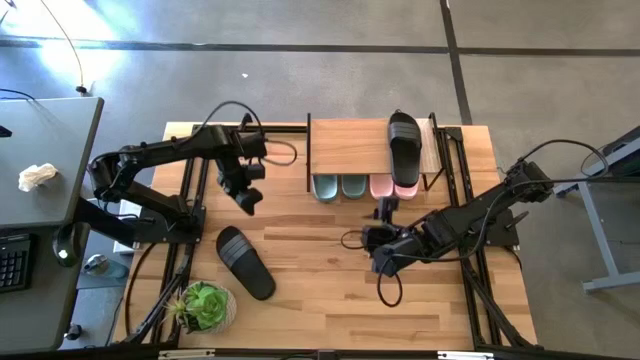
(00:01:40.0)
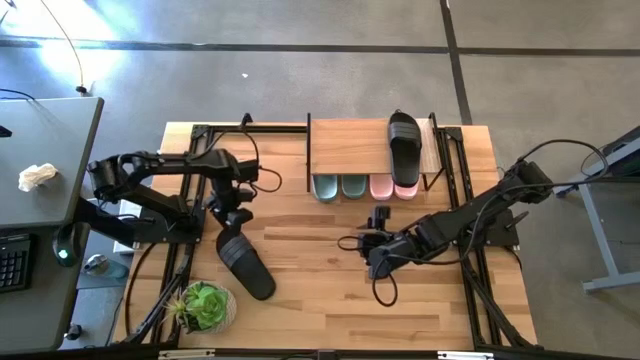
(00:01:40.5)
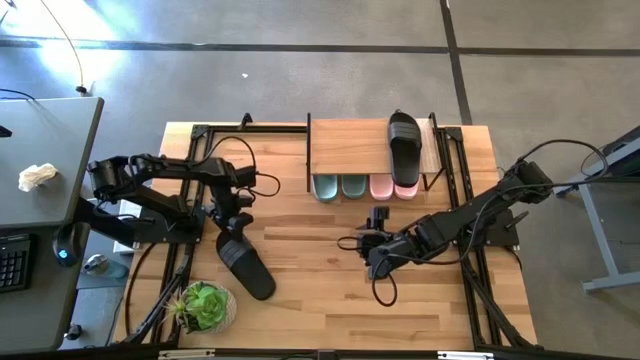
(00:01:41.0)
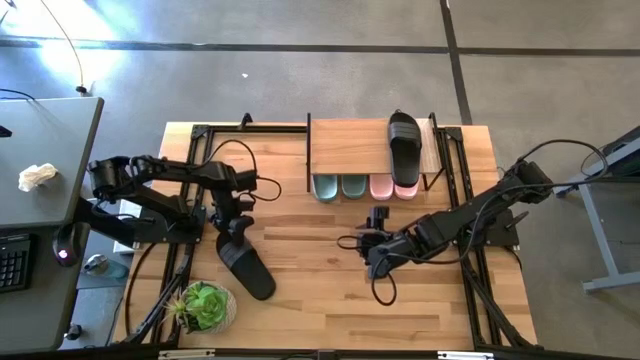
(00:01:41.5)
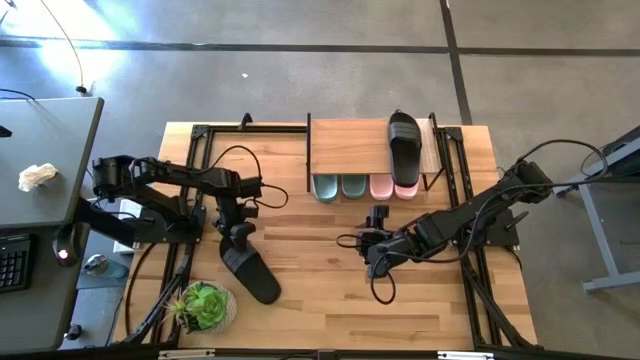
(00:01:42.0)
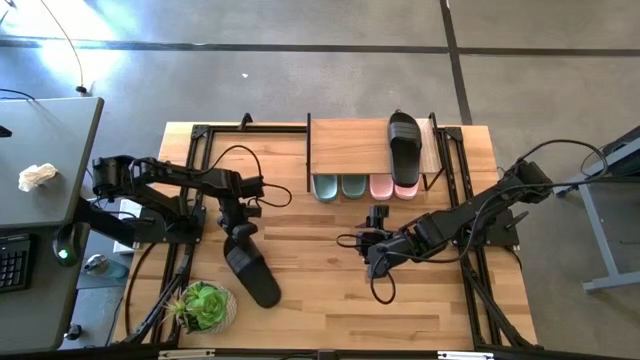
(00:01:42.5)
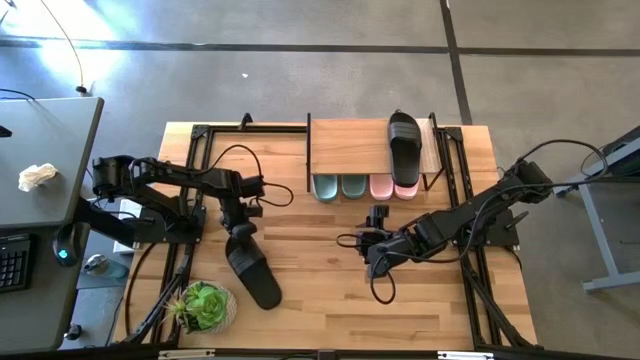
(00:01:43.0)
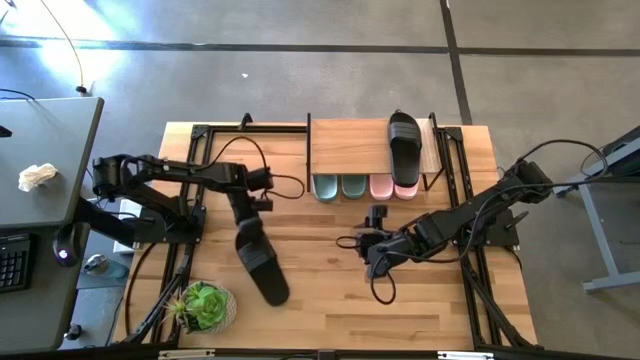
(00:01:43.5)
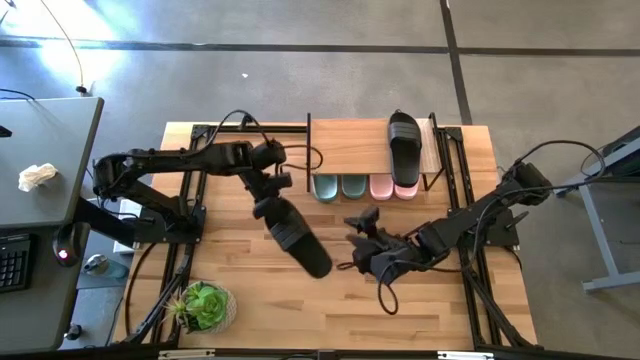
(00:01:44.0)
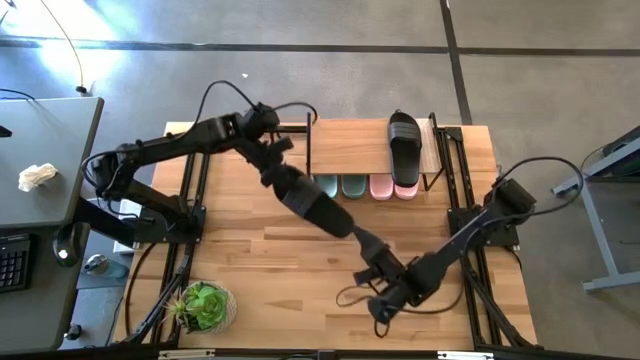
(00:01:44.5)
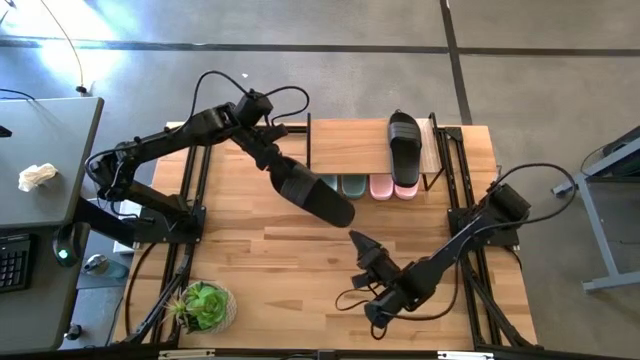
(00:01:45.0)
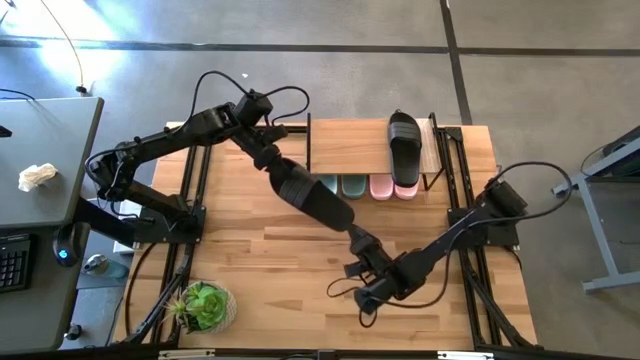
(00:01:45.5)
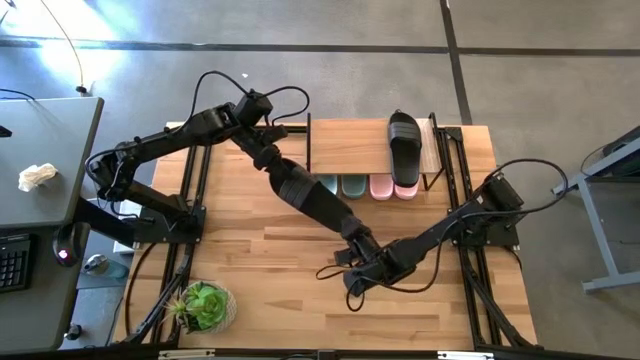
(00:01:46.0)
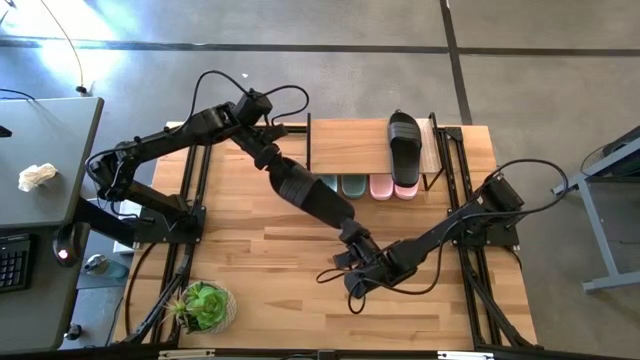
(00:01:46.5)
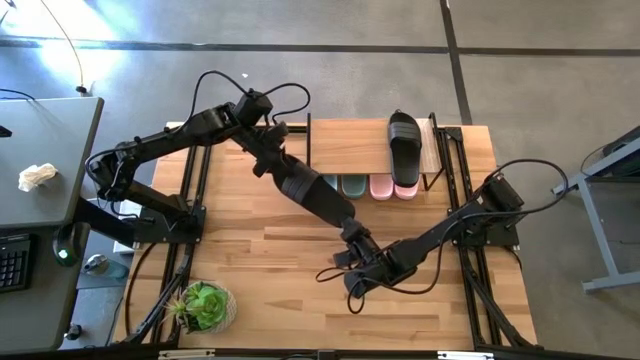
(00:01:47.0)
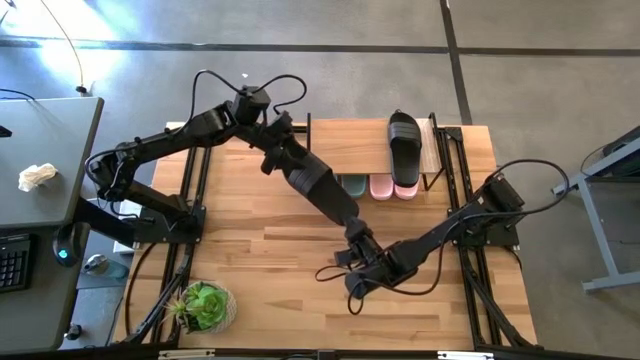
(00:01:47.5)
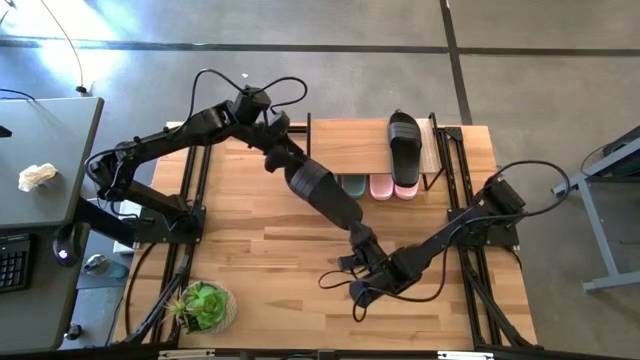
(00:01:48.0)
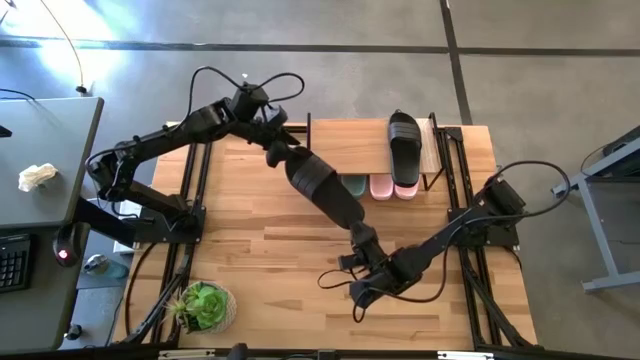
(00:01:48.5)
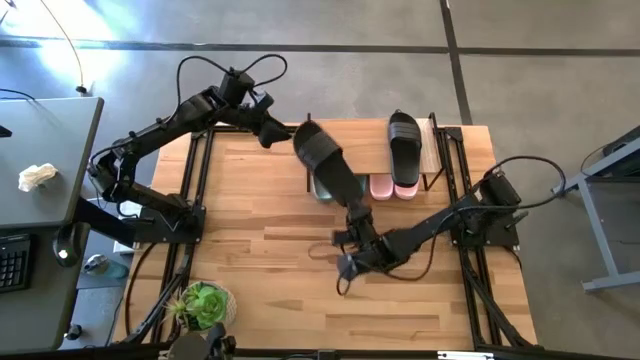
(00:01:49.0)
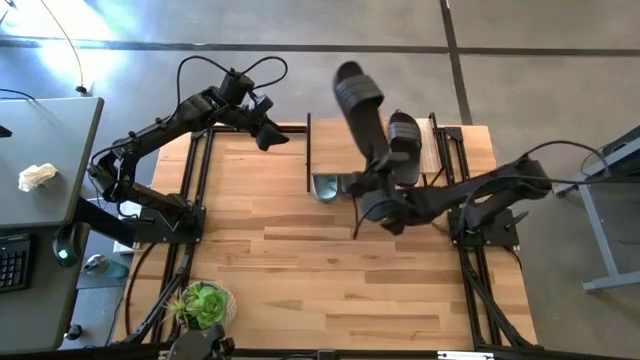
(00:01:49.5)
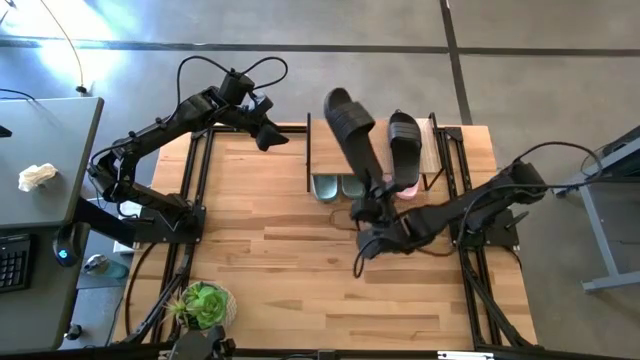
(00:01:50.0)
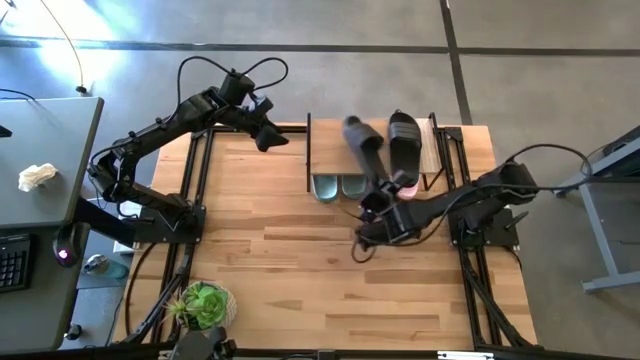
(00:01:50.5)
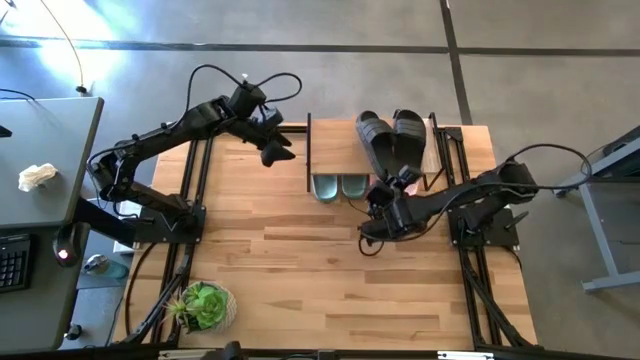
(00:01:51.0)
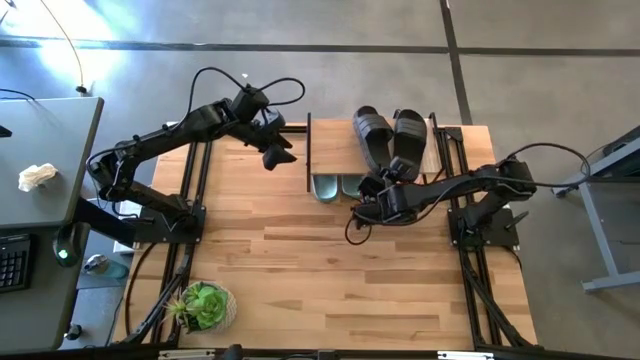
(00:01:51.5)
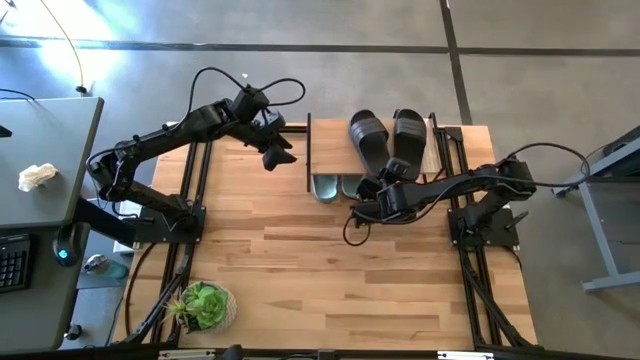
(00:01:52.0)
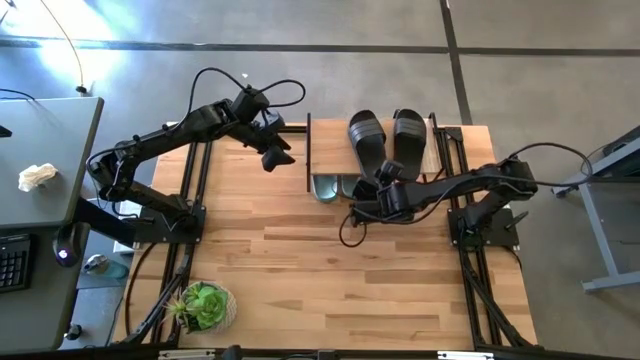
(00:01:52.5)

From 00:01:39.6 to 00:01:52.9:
Task: Pick and place slides into the shelf
Put the black slide on the shelf

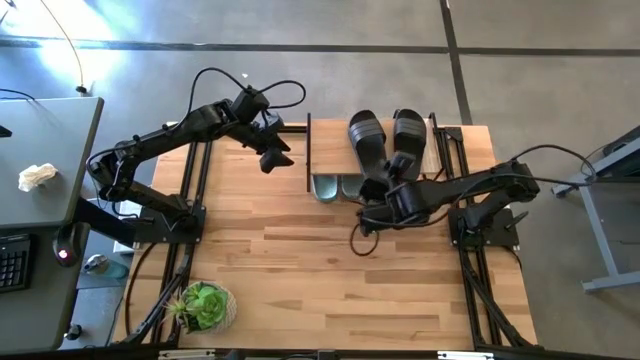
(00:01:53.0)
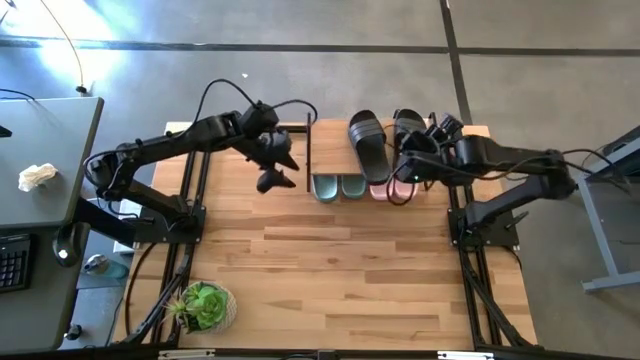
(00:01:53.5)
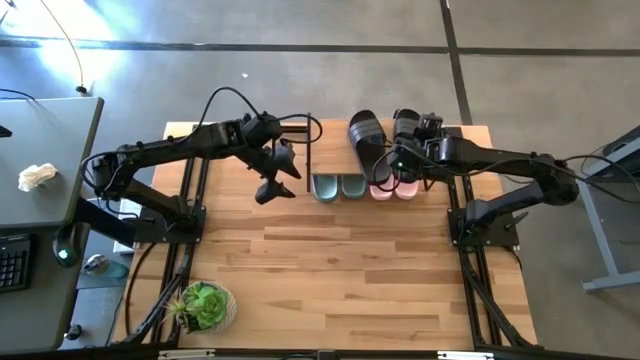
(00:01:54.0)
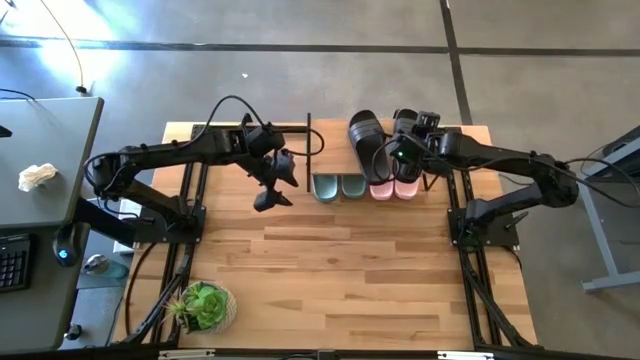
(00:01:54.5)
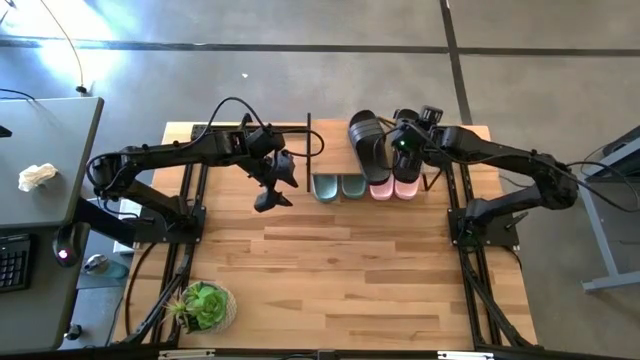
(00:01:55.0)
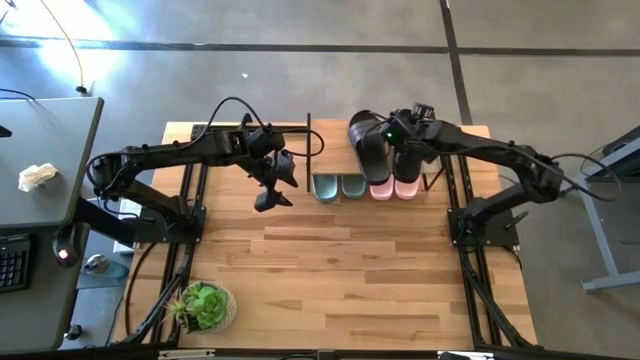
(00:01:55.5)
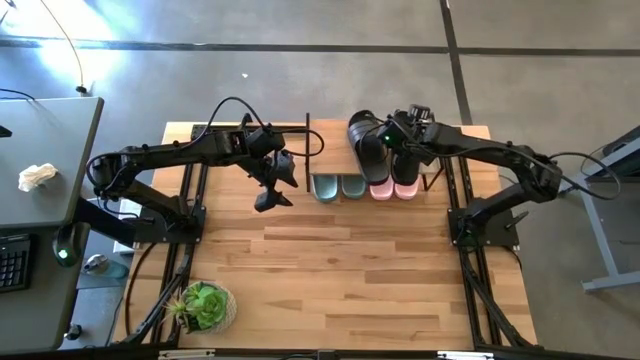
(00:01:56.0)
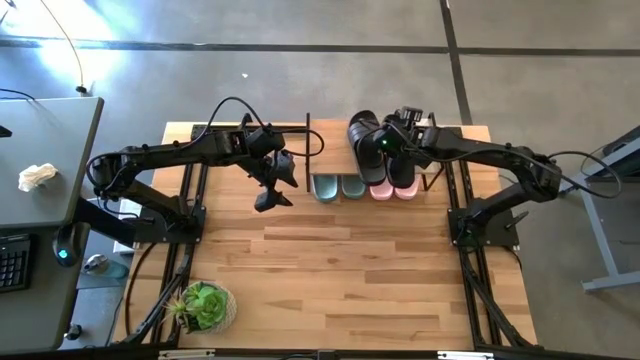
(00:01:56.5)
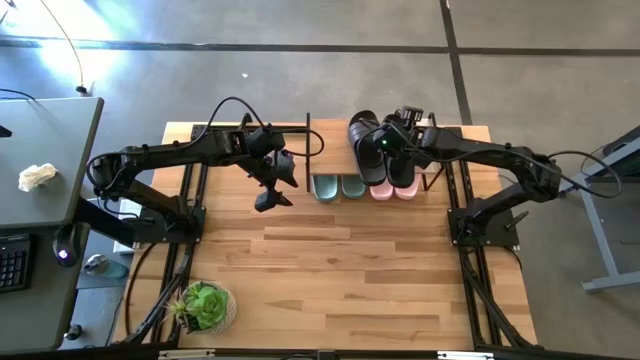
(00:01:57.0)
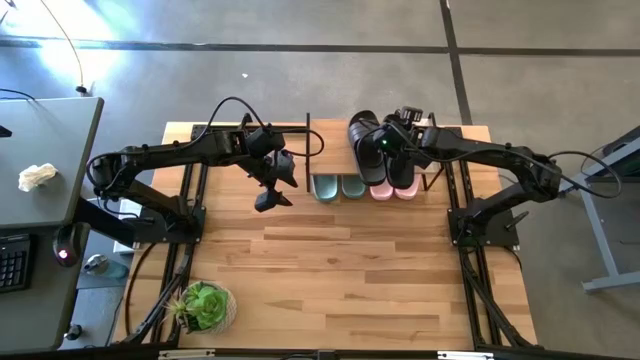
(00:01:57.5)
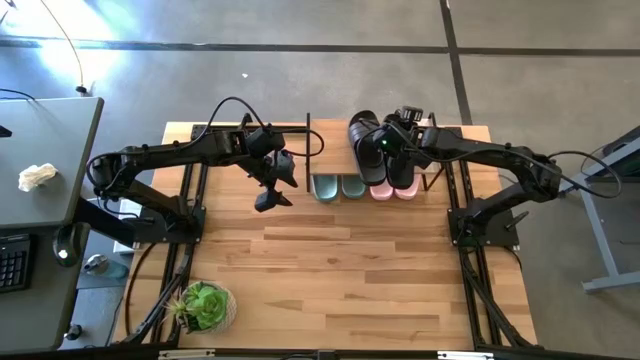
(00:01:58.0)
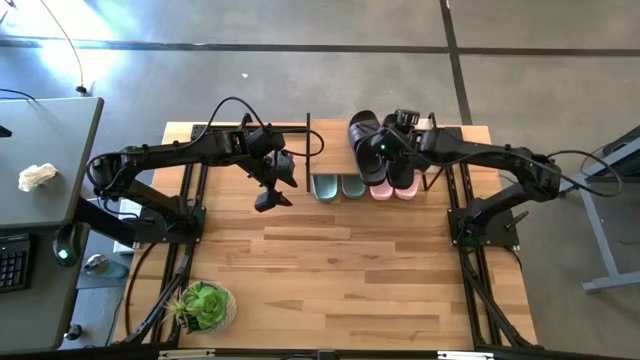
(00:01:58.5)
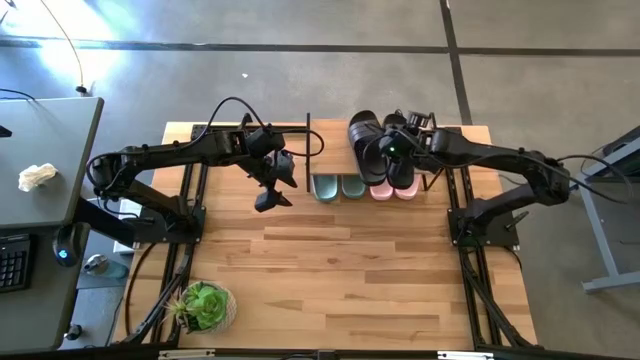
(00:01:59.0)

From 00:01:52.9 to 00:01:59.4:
Adjust the right black slide

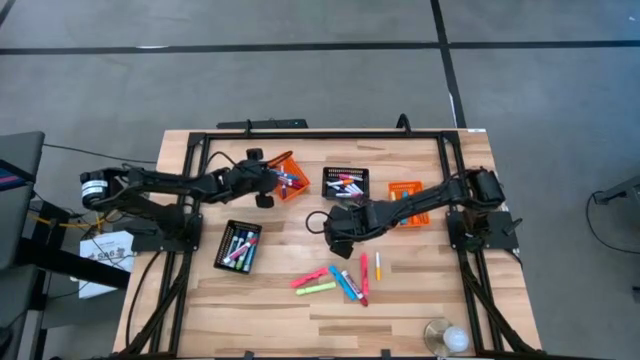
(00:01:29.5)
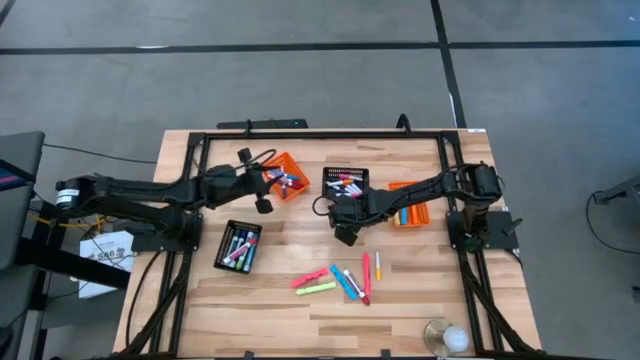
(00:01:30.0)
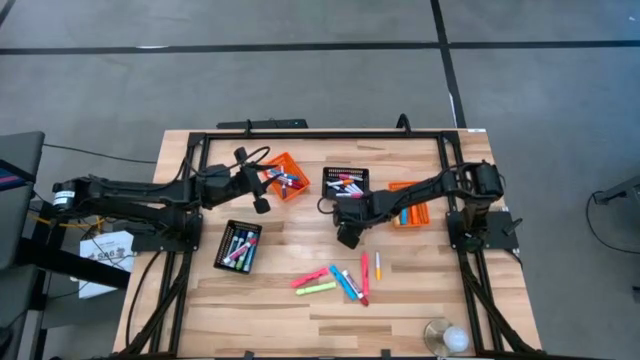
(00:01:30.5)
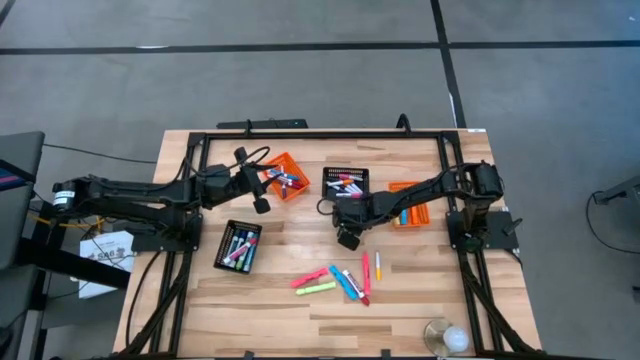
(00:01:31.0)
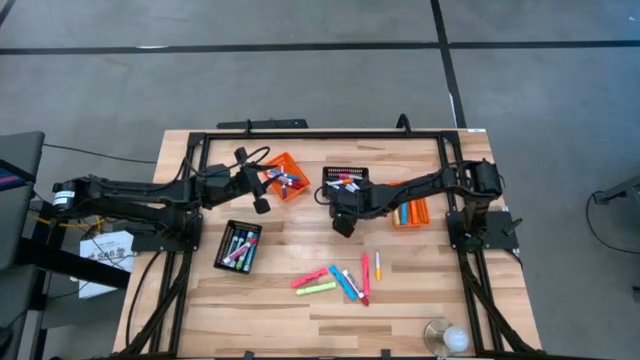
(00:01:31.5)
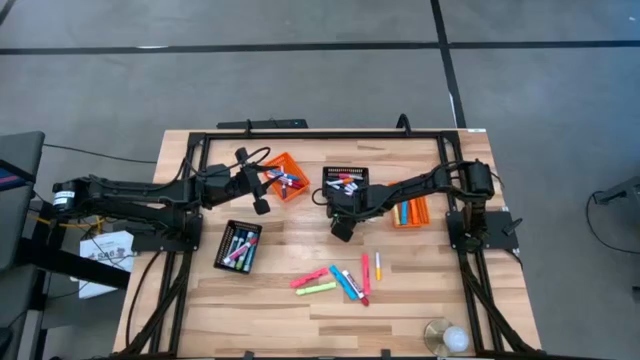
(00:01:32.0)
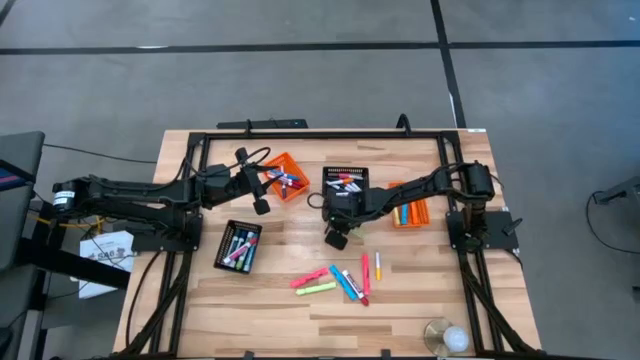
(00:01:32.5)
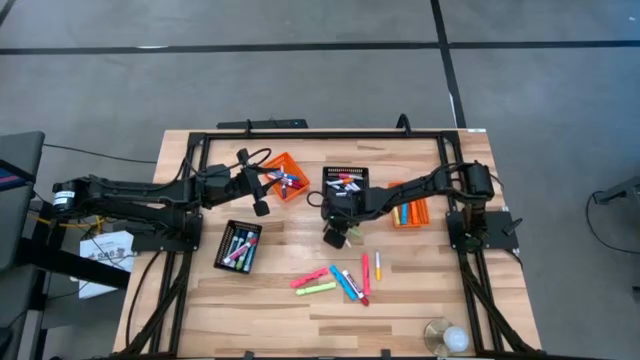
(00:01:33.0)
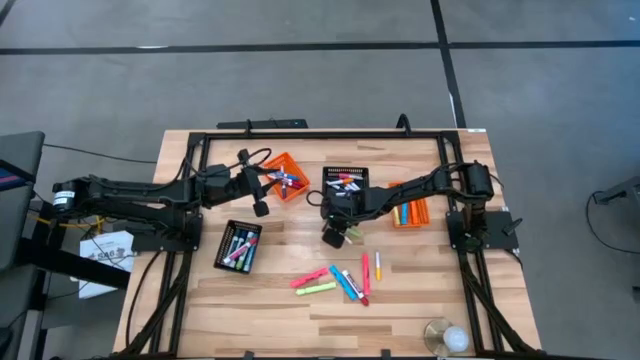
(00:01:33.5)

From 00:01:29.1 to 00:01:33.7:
Task: Pick & Place Markers
Put the light green marker into the left orange bin
